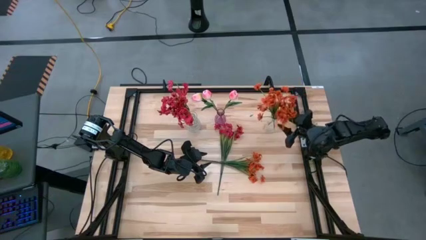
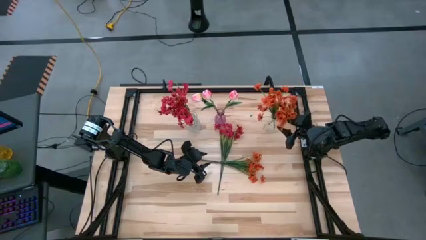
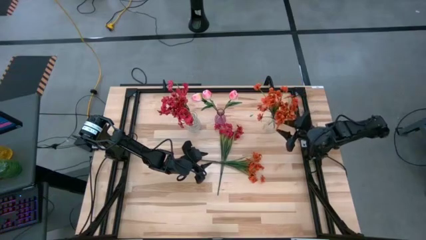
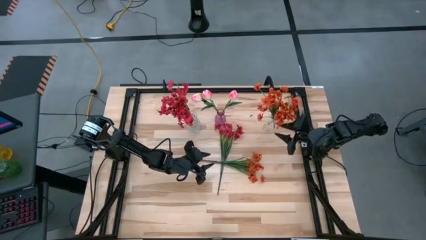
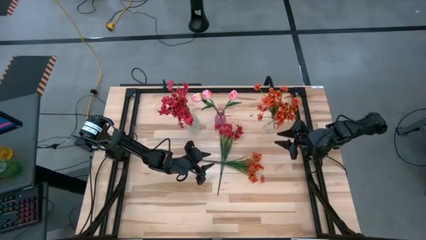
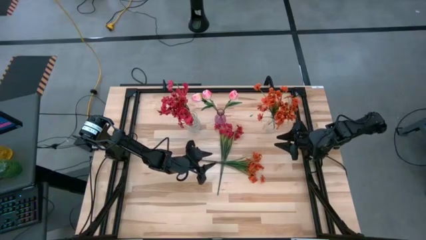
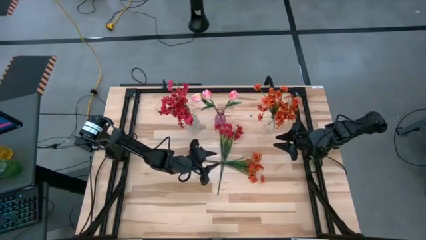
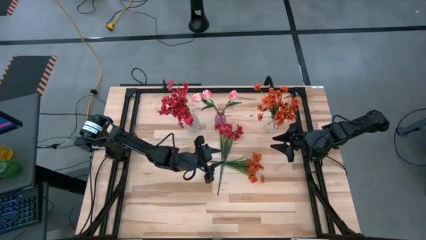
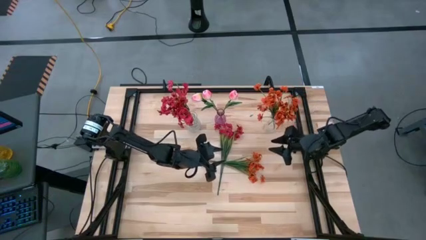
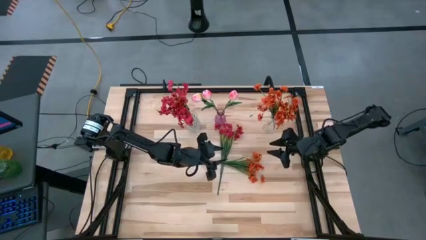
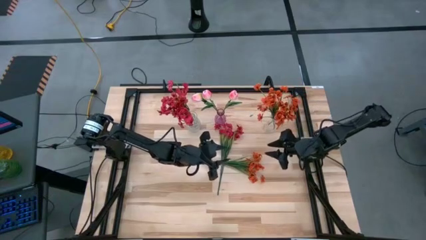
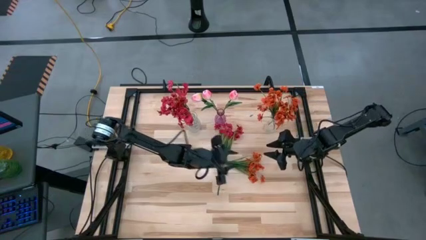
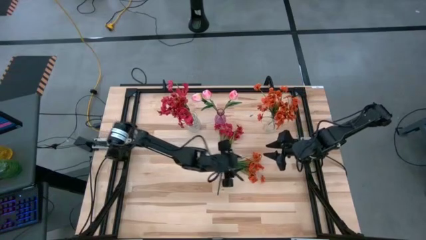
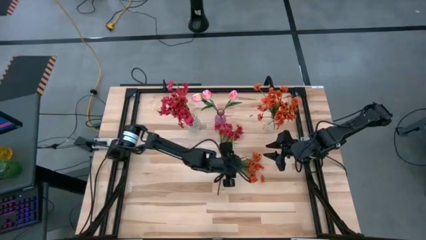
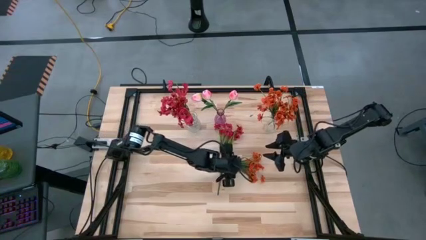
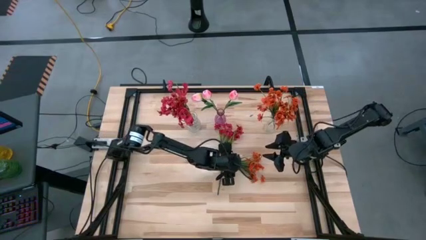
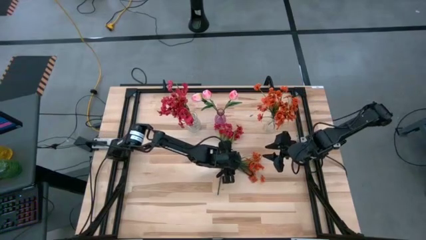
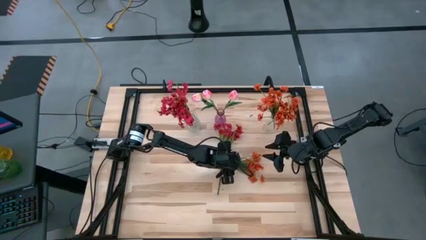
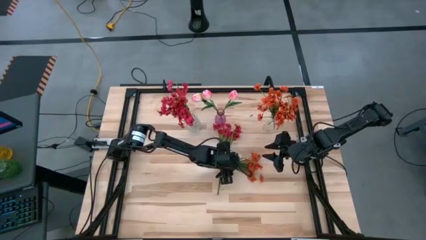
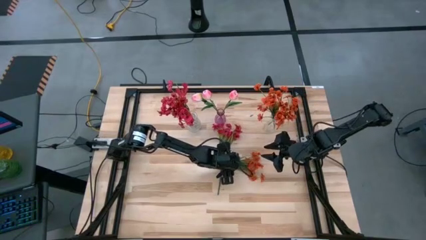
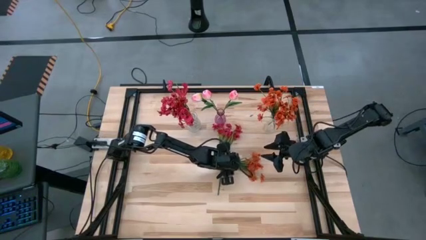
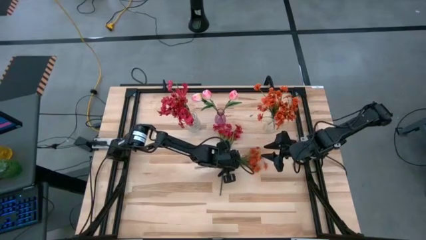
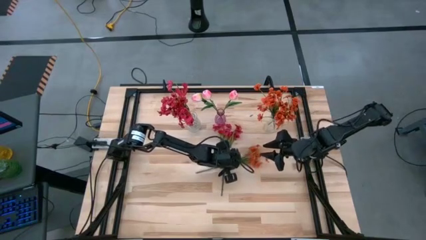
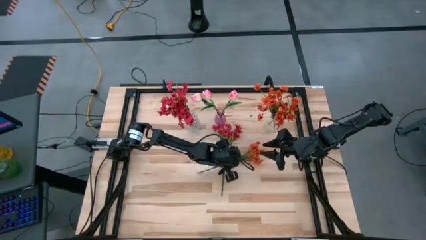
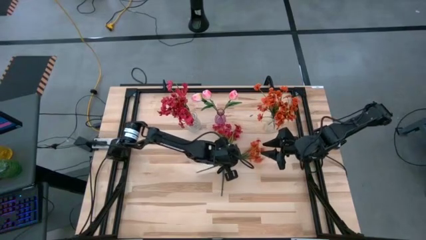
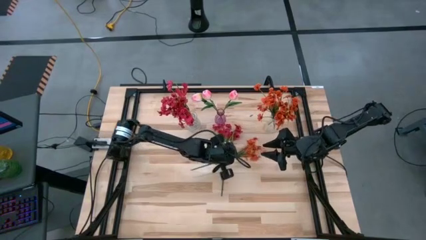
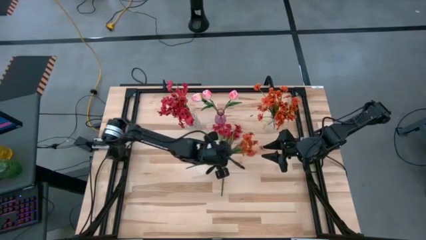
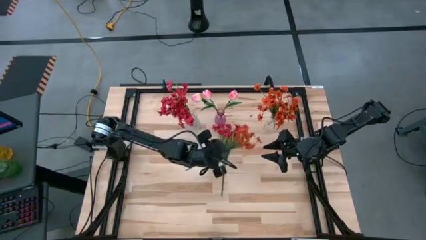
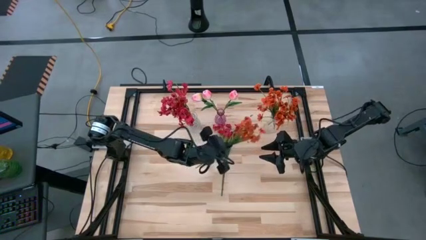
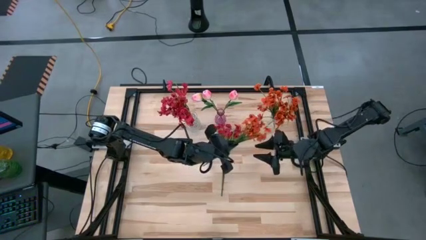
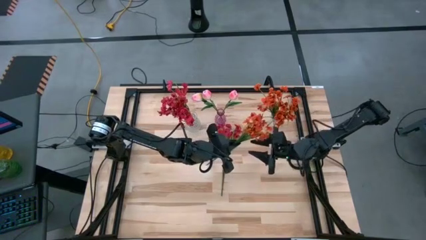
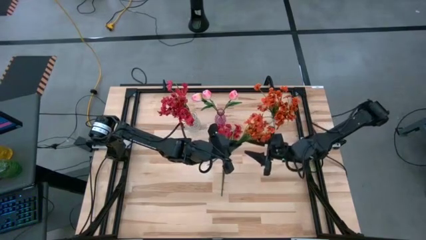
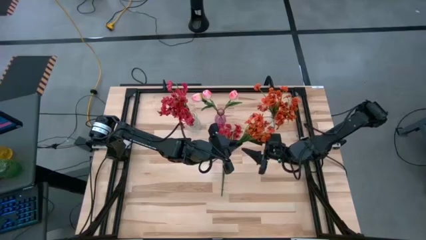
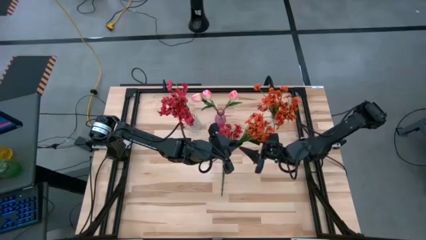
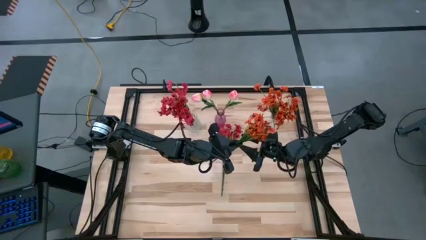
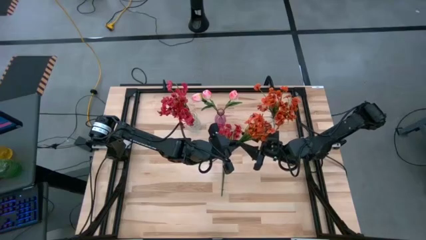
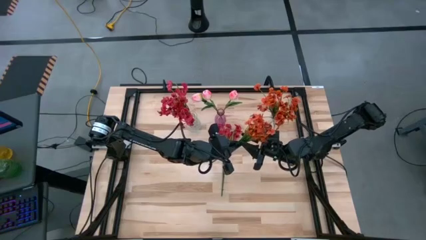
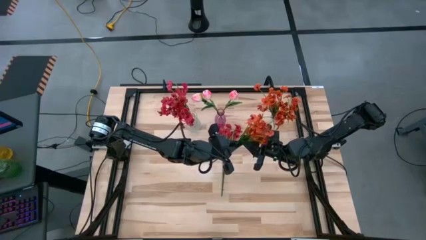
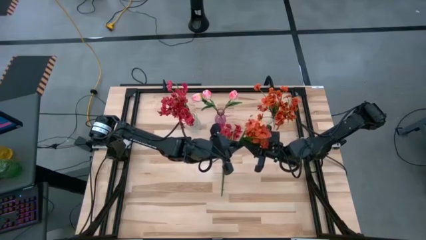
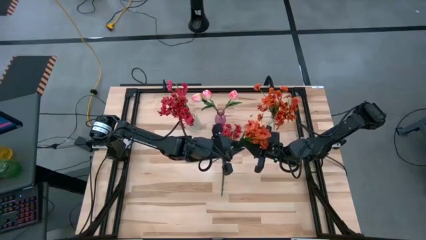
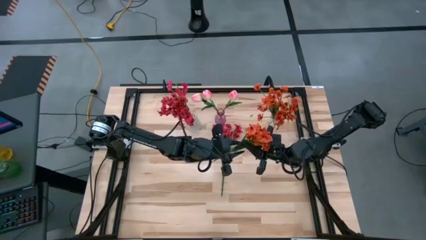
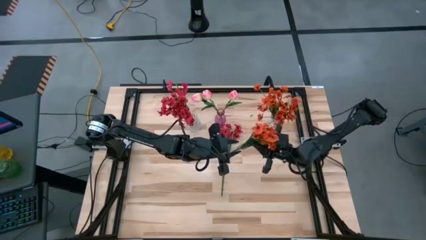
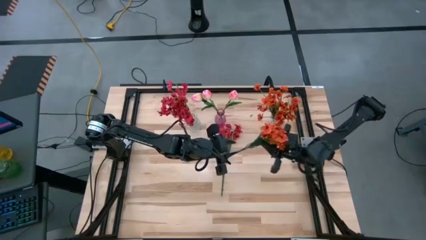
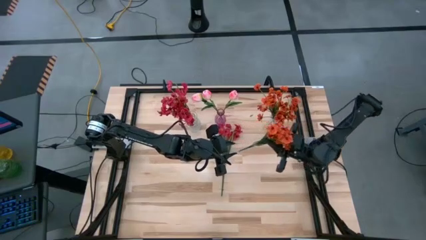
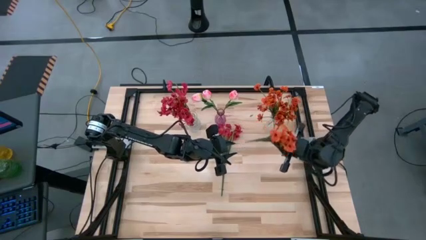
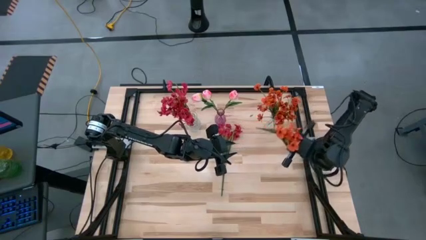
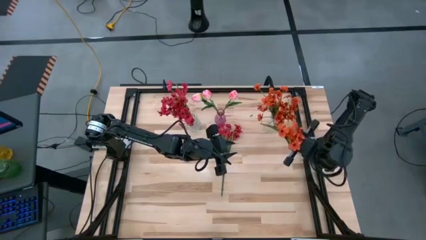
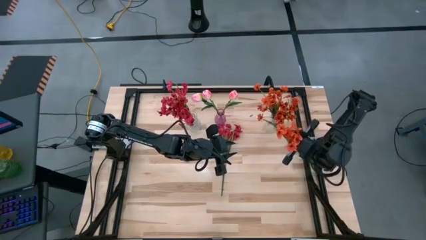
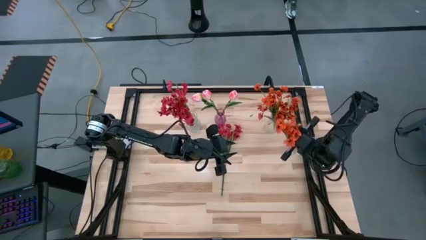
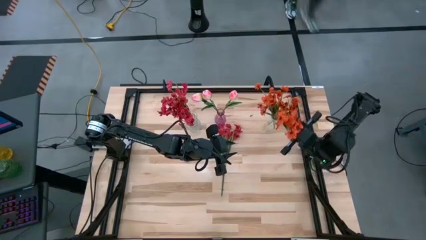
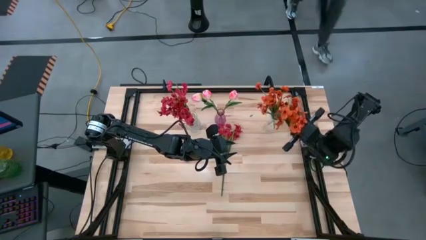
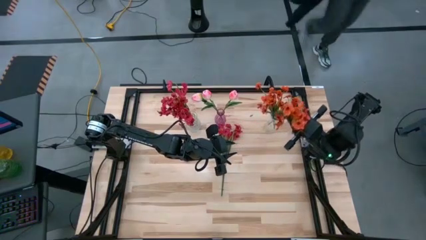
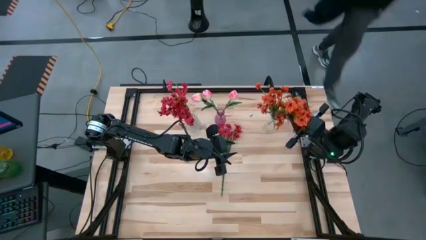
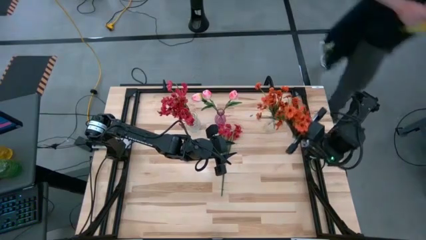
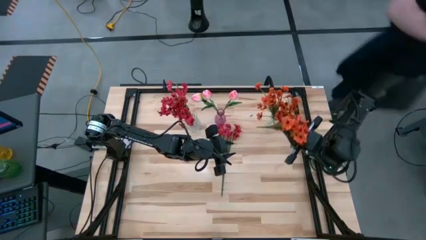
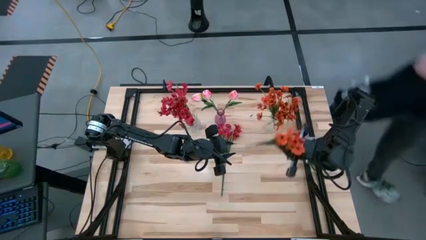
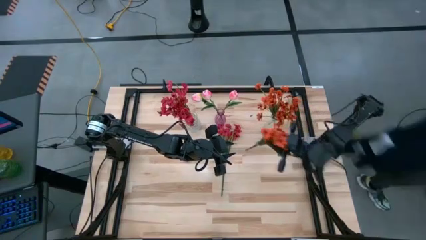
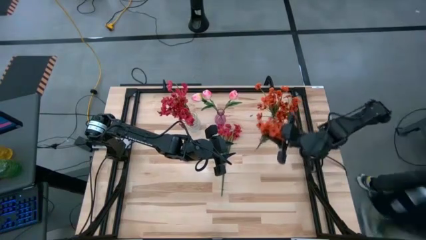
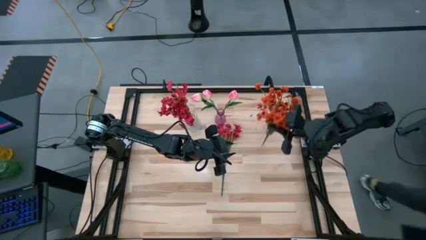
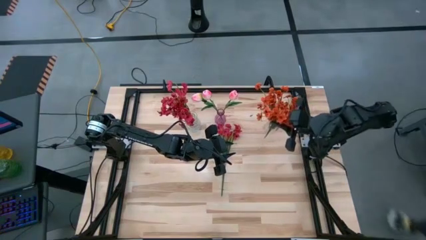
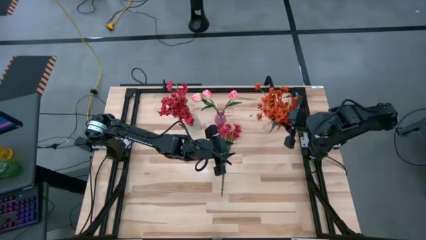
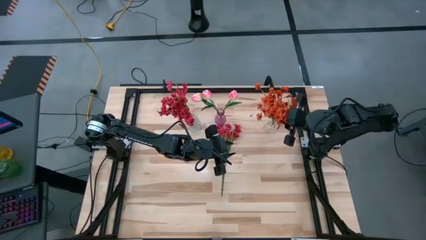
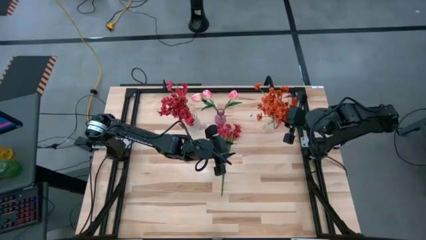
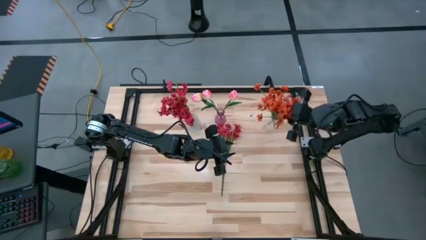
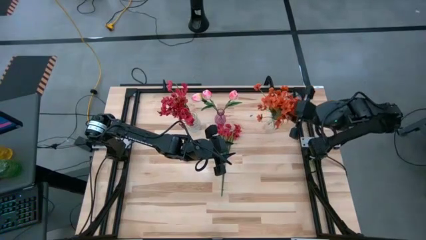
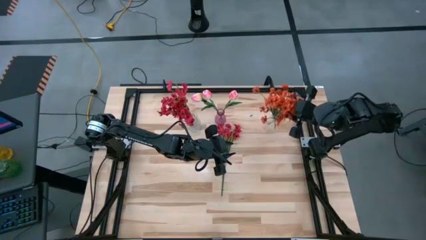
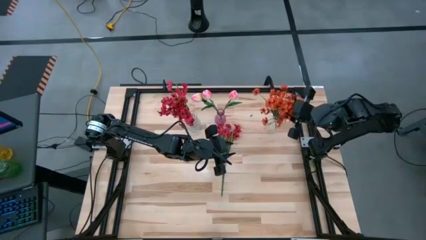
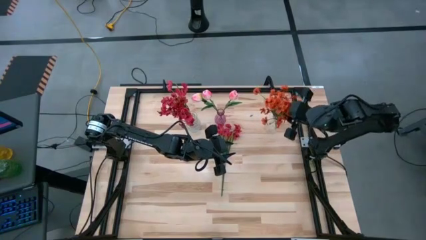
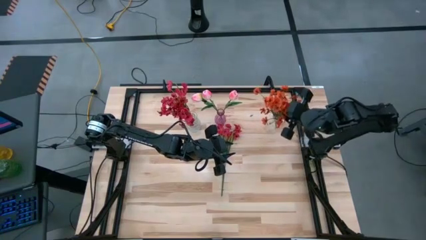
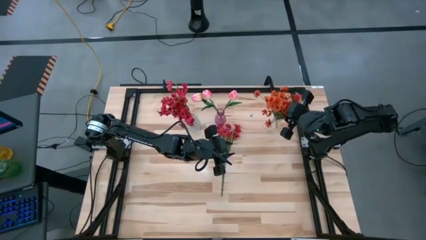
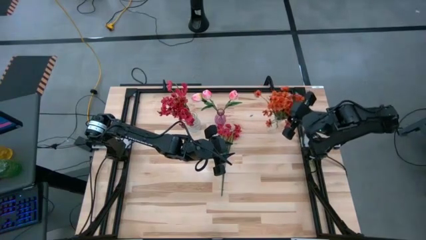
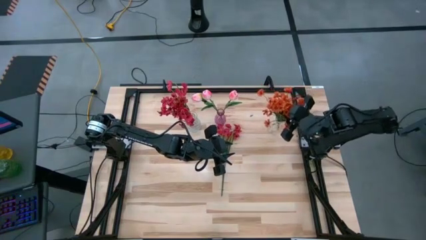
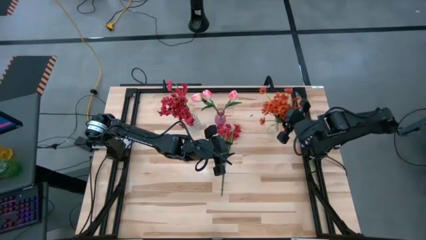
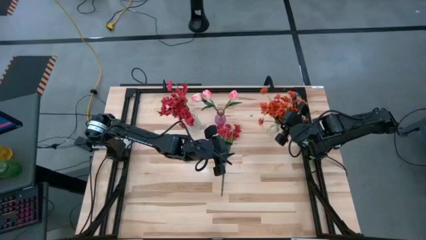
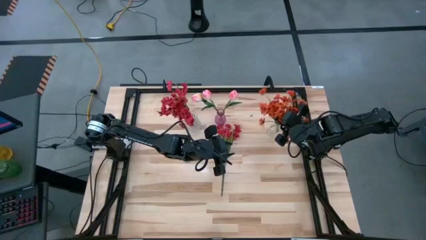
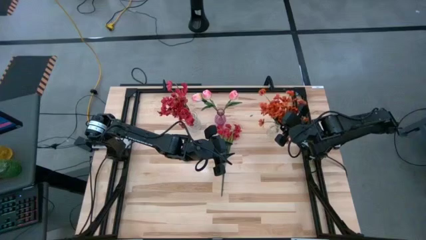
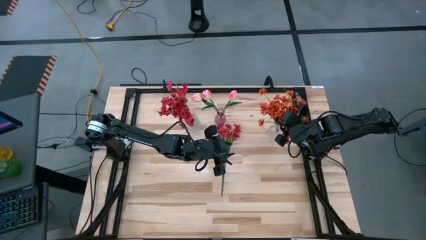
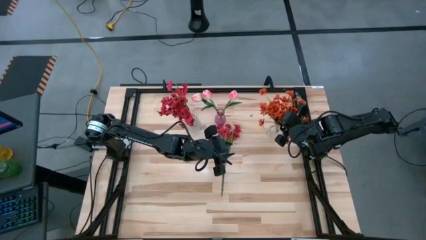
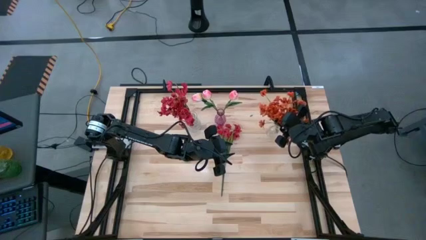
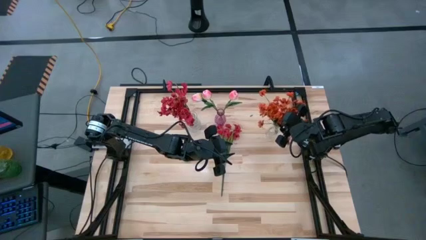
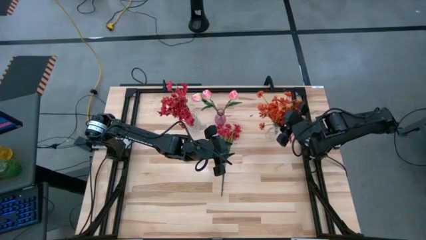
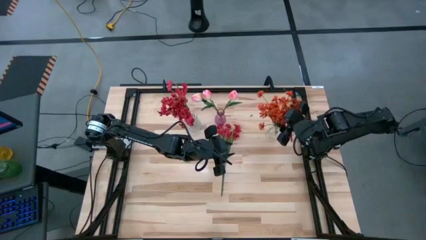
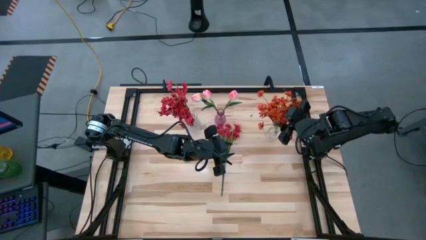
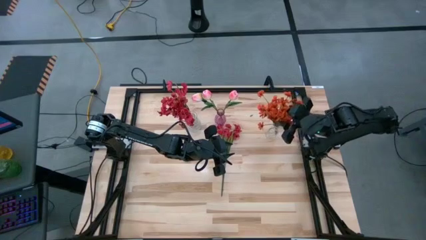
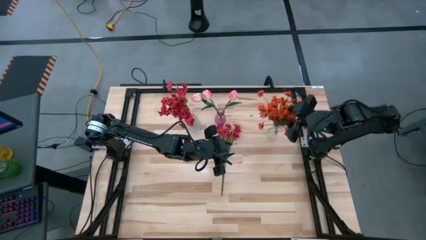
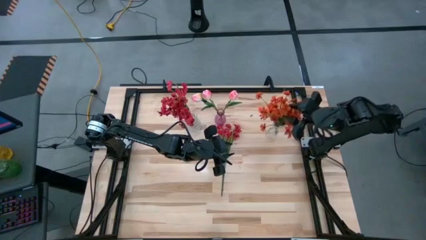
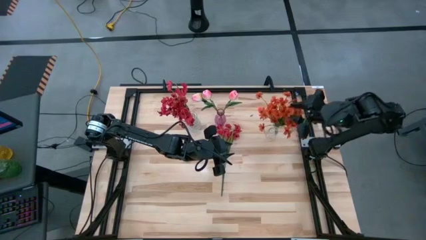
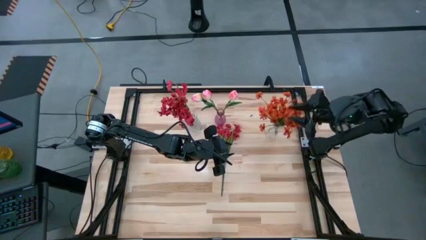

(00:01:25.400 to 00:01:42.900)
Task: Sort flowers into vase by color
Put the orange flowers into the right transparent vase
